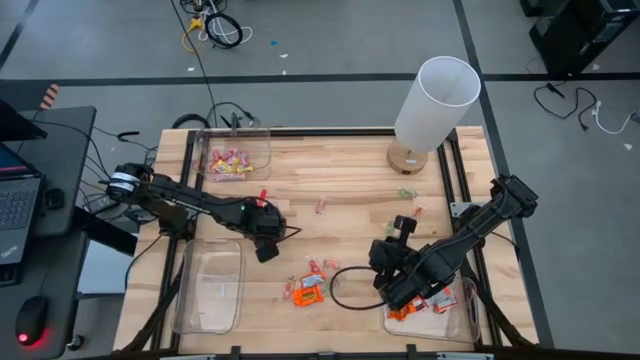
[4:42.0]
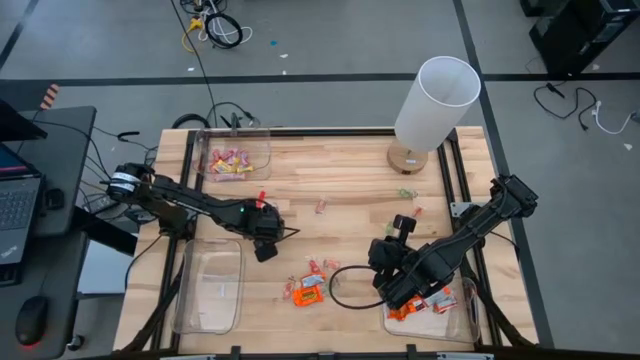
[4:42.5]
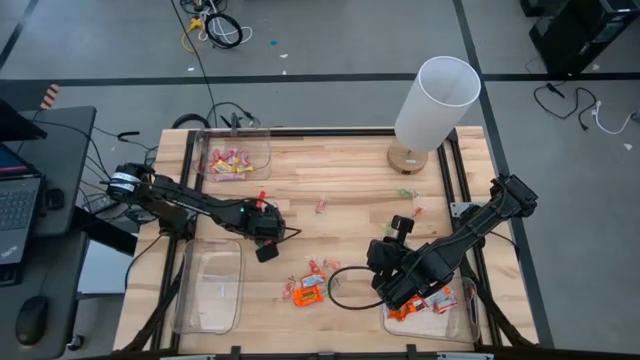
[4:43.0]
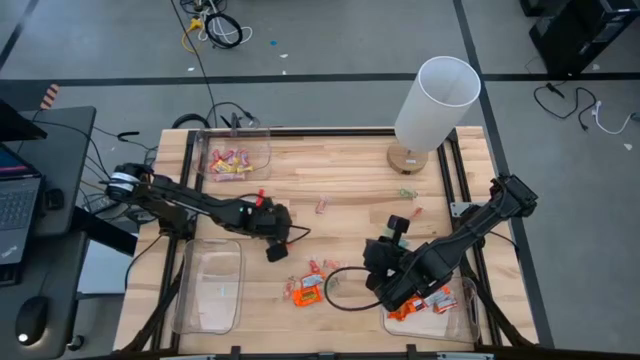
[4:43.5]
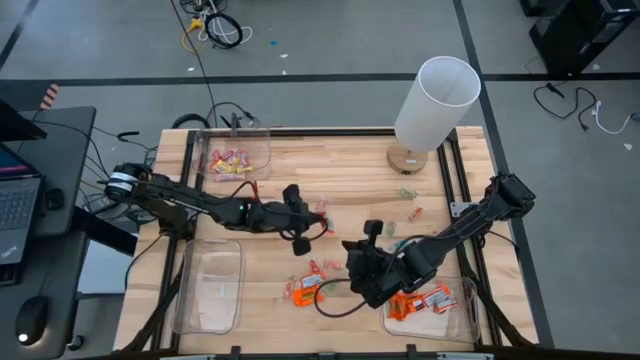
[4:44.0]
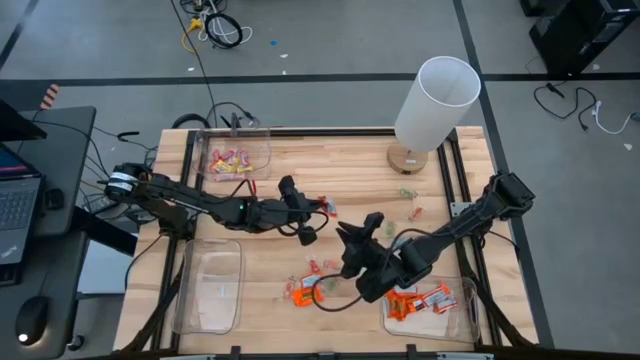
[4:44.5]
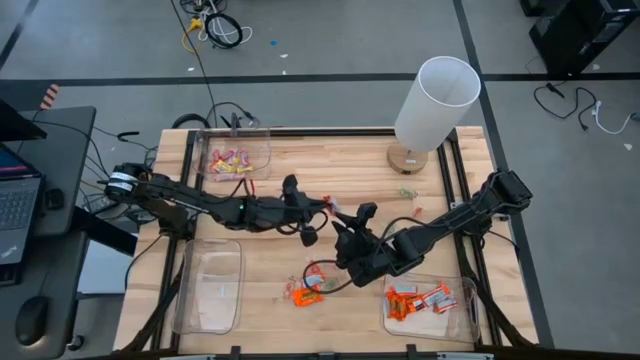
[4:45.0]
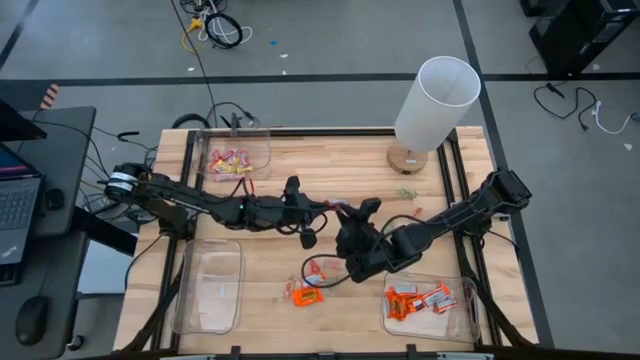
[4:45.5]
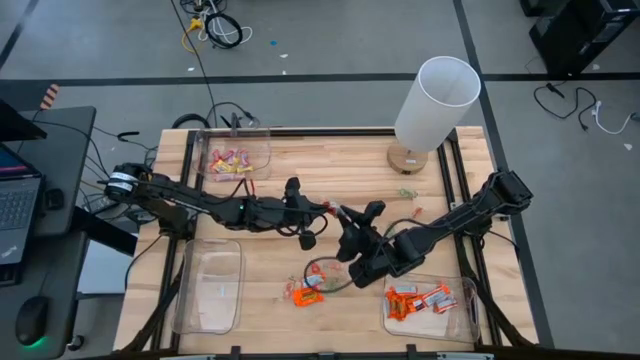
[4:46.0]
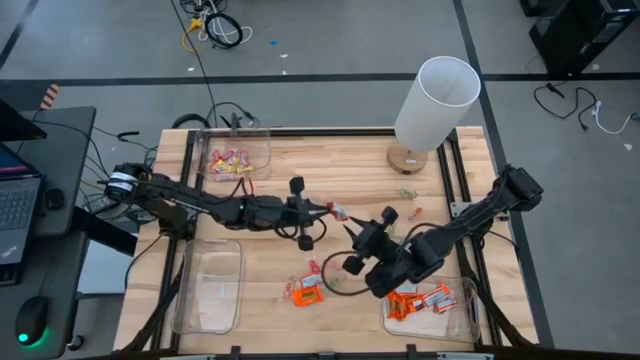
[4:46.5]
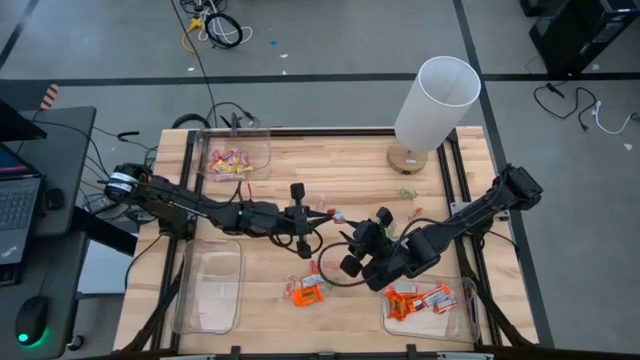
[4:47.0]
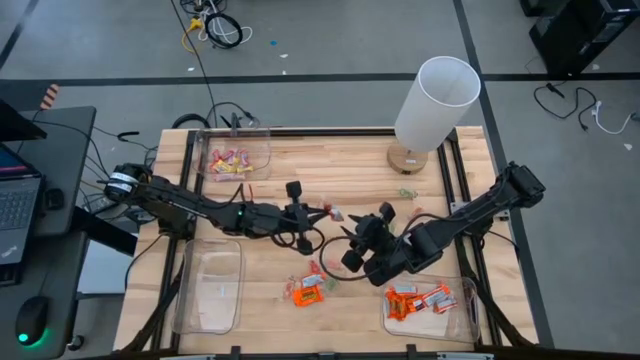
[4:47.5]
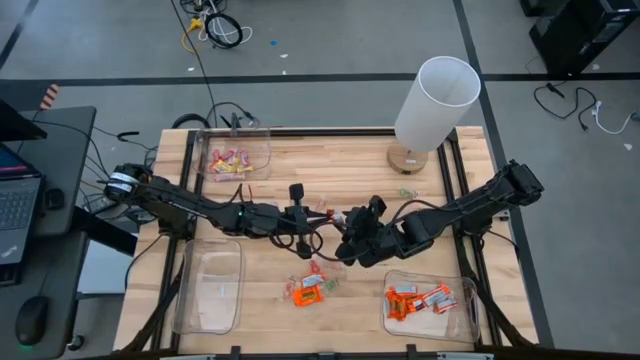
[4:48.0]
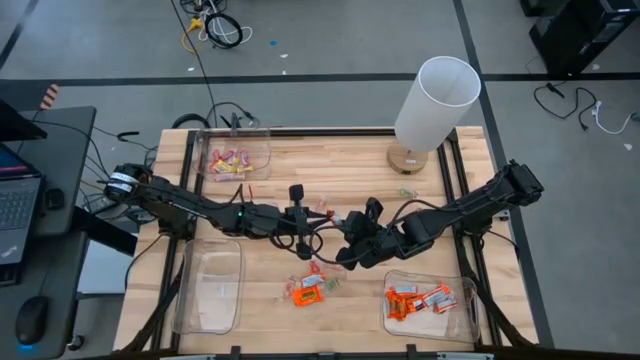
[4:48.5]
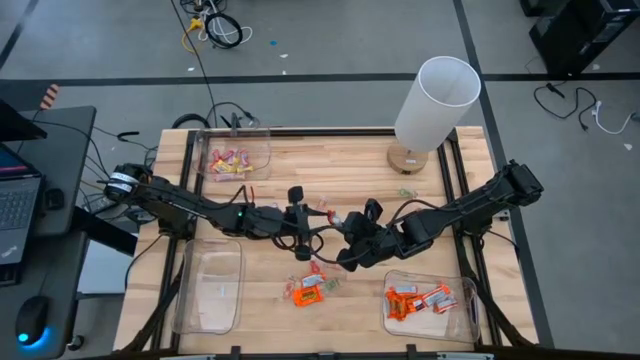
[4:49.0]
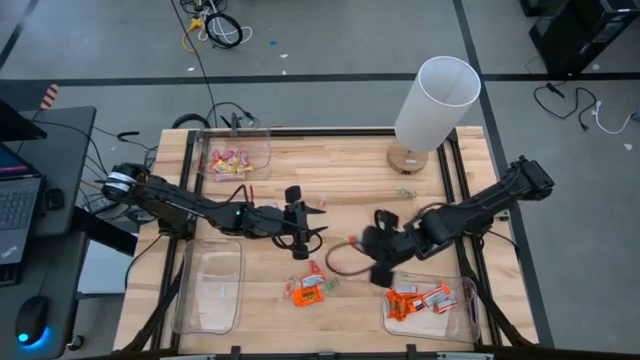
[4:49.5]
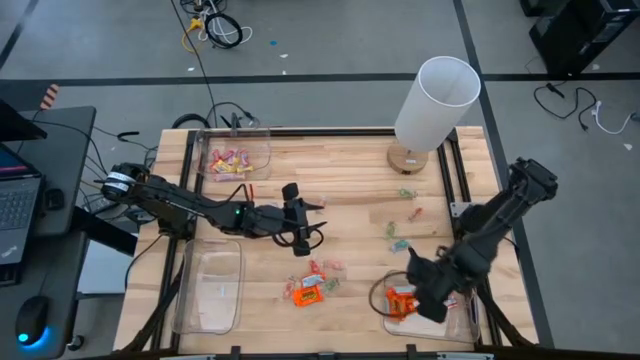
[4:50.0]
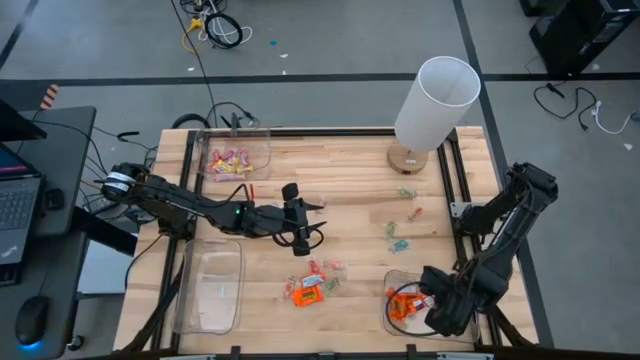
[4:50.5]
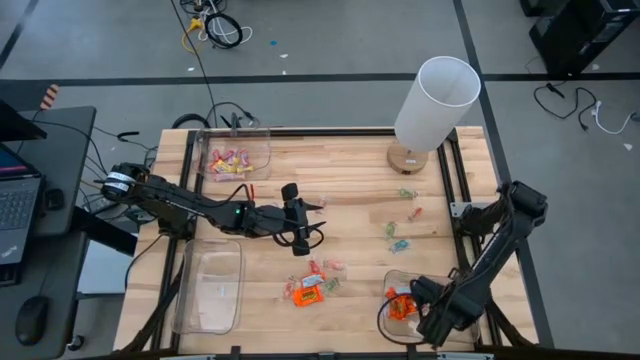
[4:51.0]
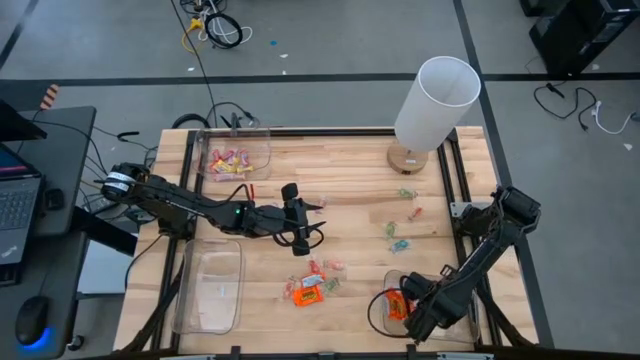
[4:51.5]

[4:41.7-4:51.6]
Task: Sort candy
Put the chocolate into the bottom right transparent bin

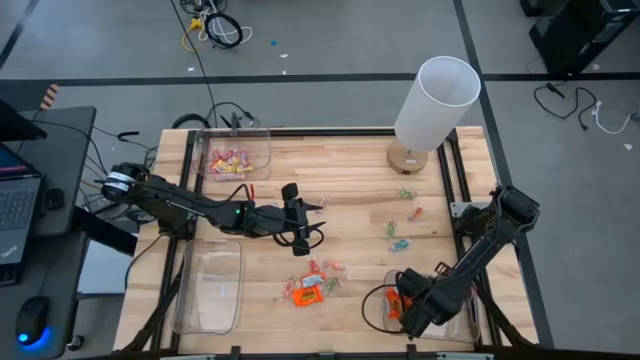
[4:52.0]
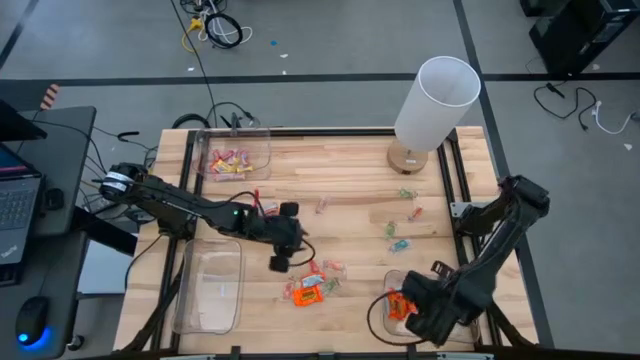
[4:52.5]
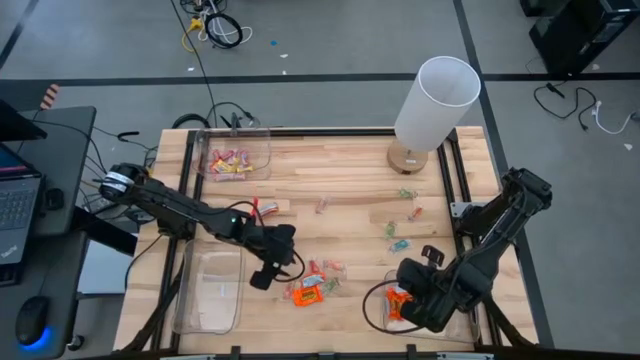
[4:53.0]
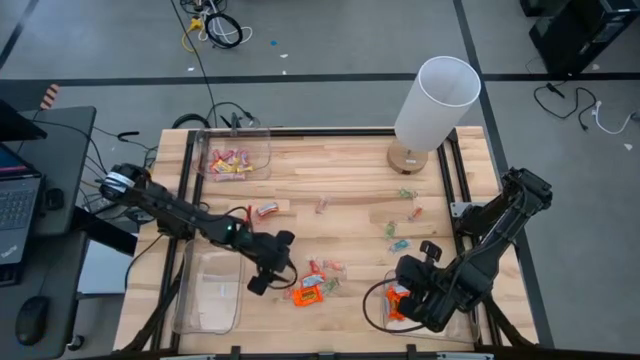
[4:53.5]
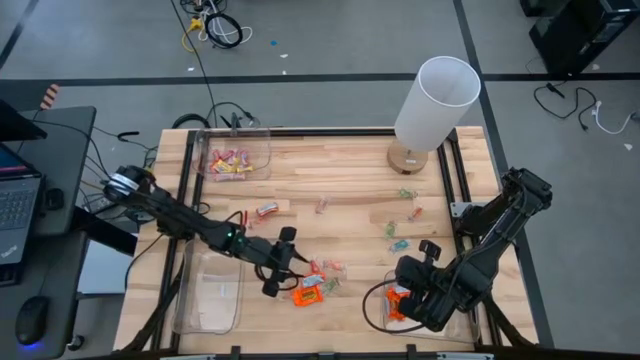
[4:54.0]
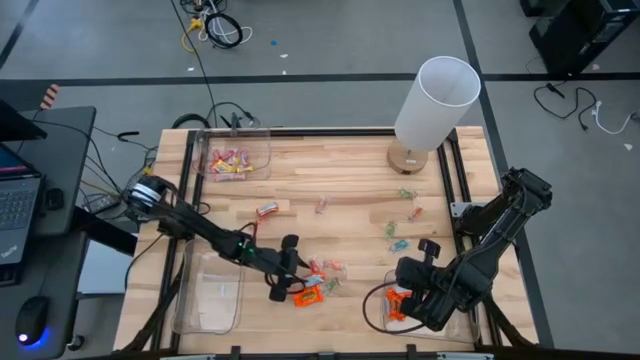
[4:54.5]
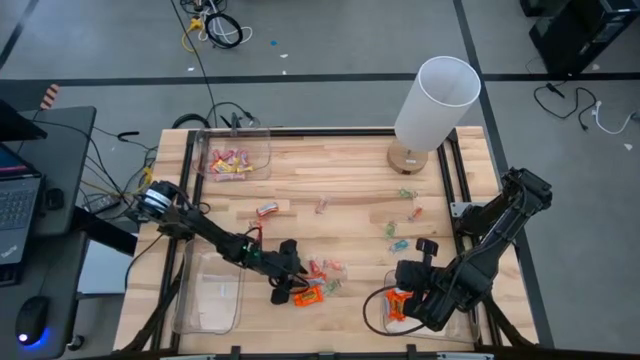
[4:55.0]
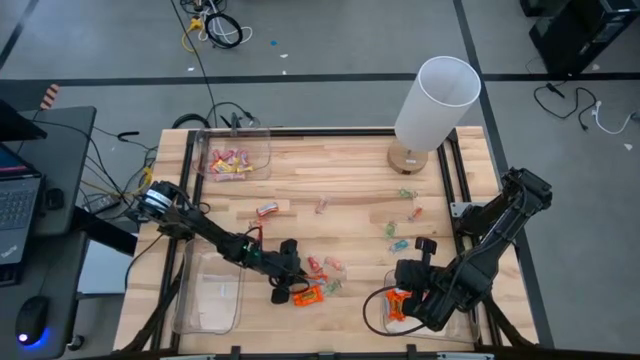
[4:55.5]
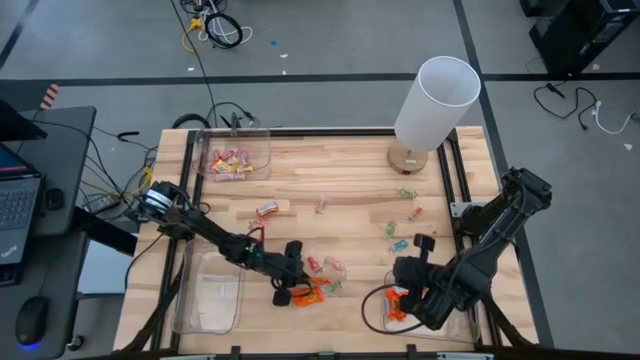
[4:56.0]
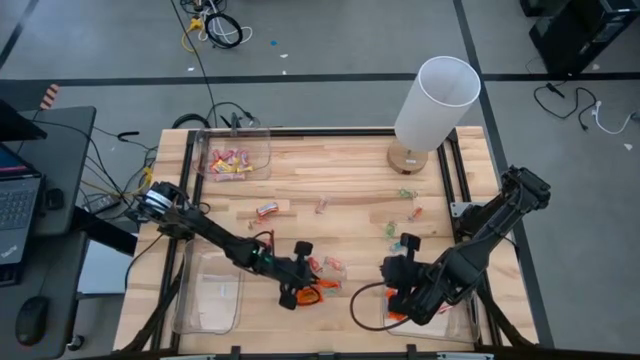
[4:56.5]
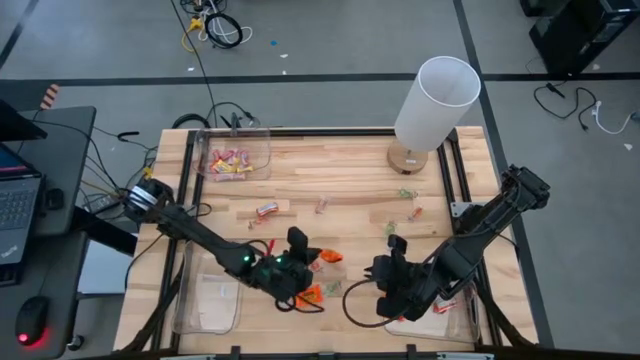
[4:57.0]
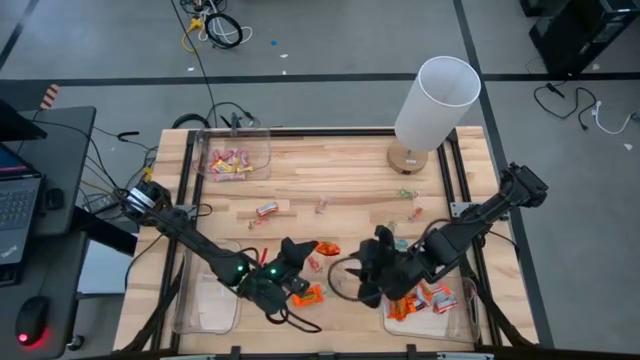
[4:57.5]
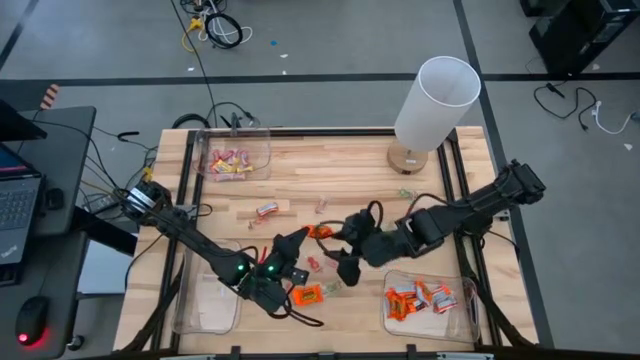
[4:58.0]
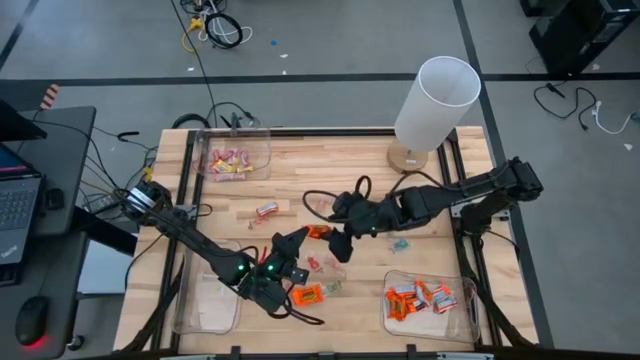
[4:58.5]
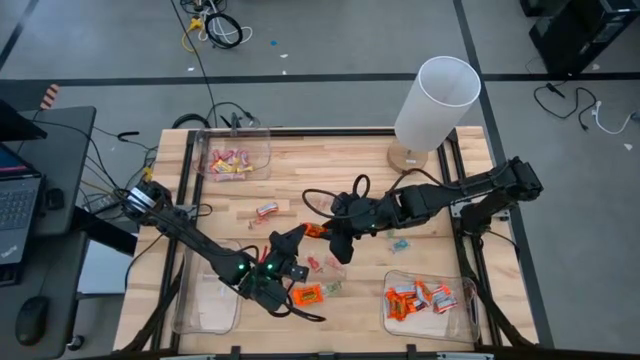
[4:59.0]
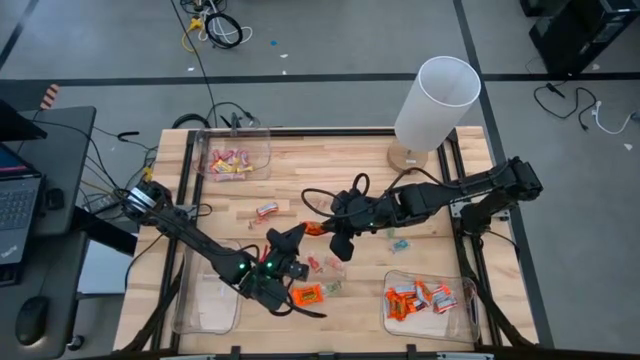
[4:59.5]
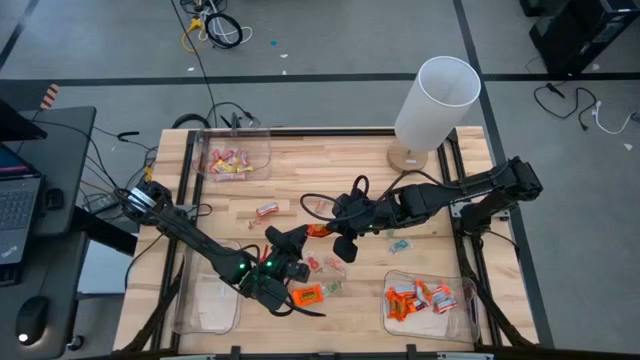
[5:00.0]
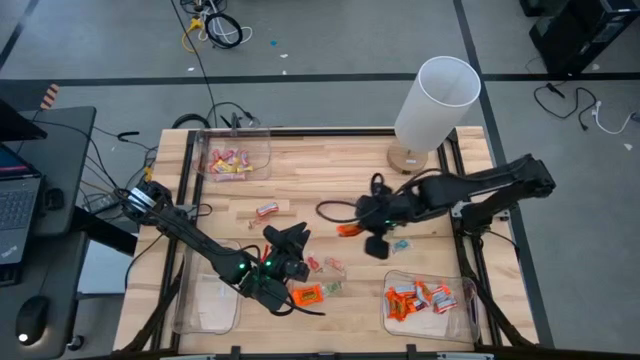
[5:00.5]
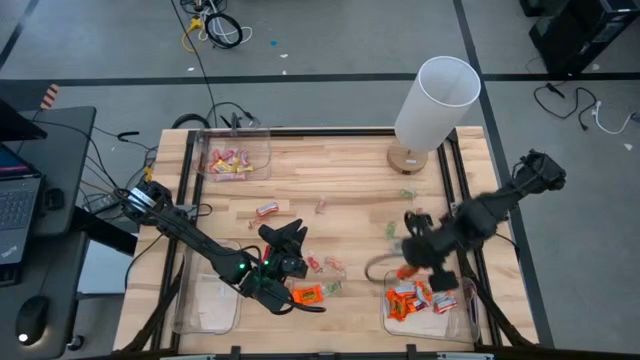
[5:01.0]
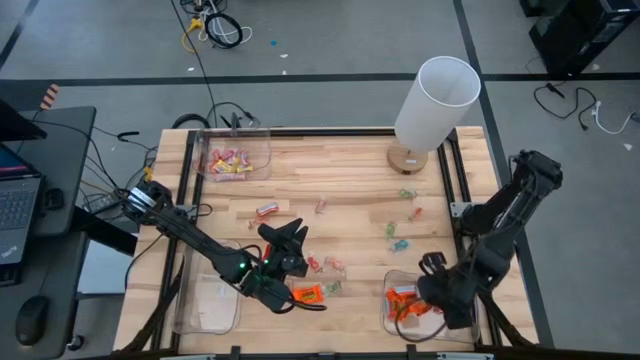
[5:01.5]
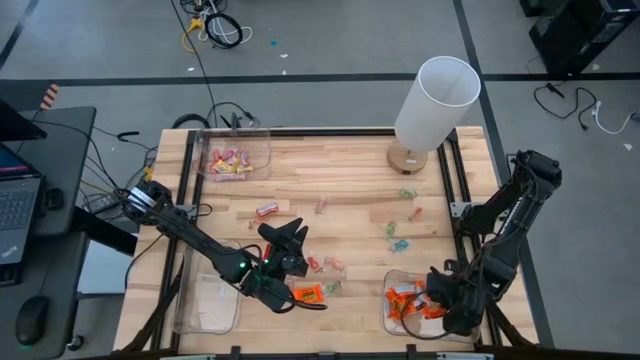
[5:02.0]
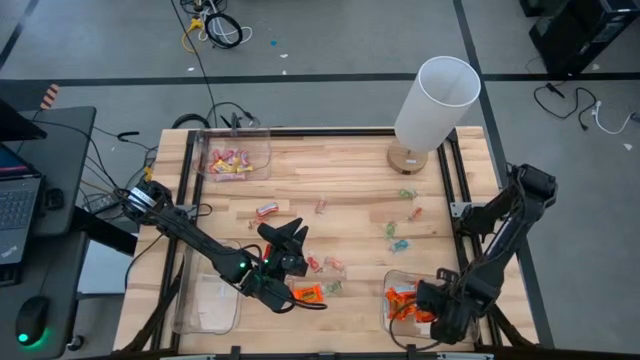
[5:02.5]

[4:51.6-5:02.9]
Put the chocolate into the bottom right transparent bin

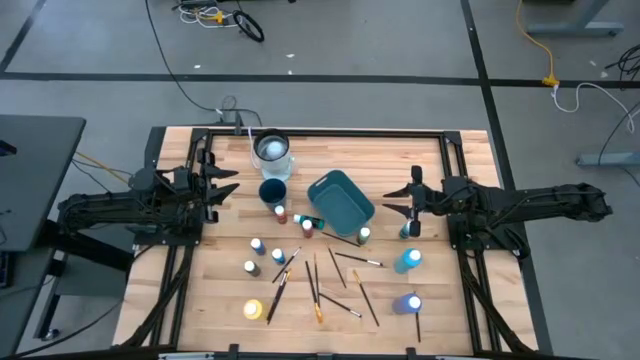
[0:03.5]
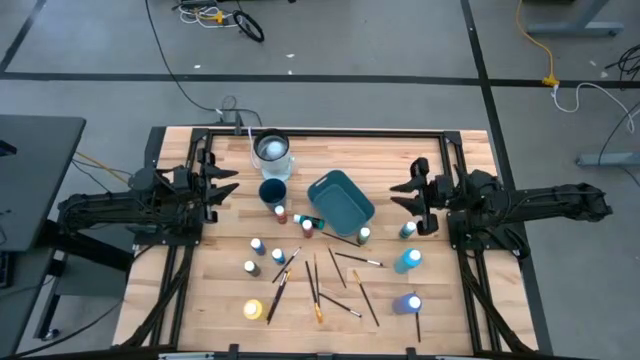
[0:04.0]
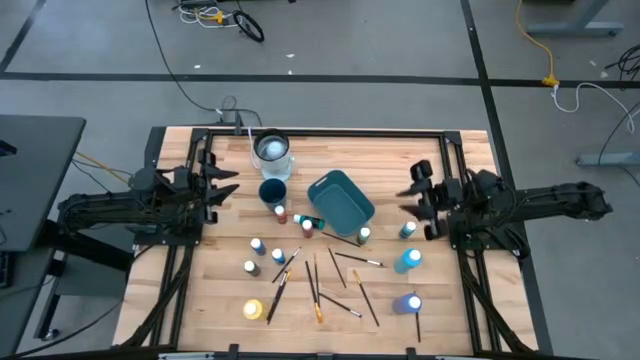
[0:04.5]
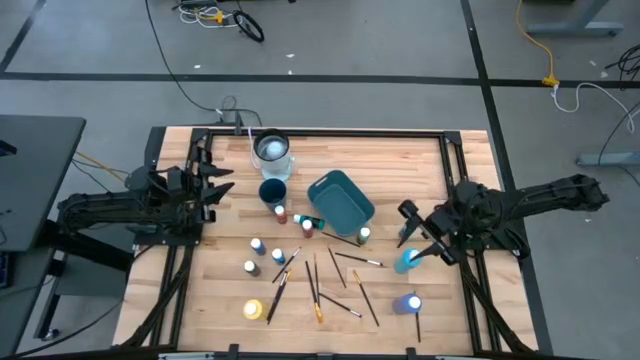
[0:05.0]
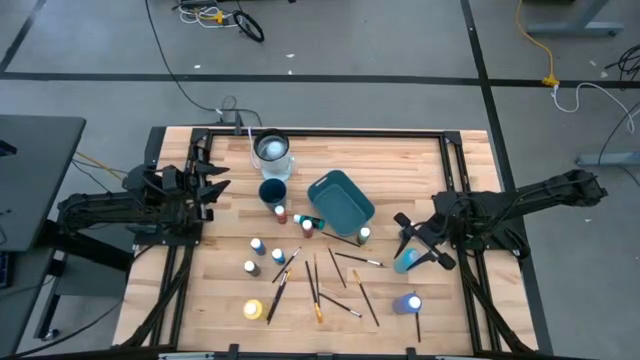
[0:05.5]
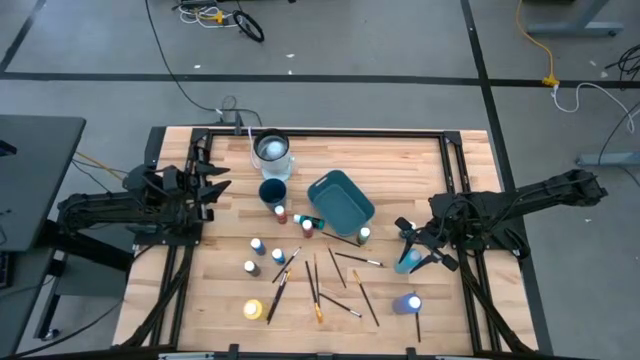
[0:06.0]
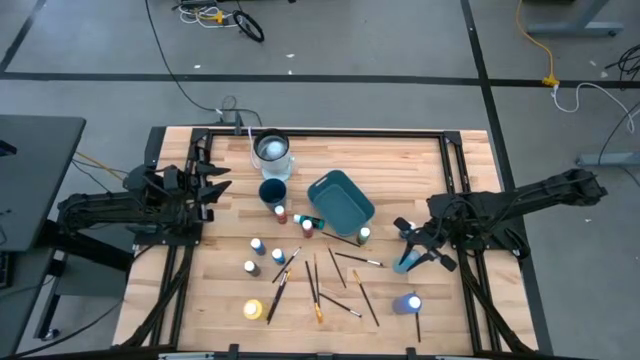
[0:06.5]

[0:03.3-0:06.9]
Task: Pick & Place Paint Supplies
Put the large light blue paint bottle into the blue bin
